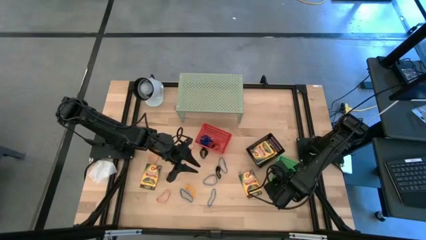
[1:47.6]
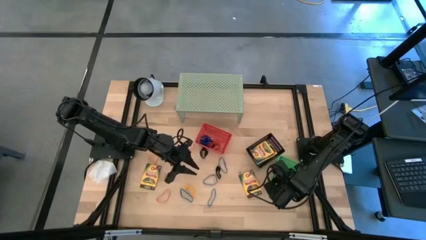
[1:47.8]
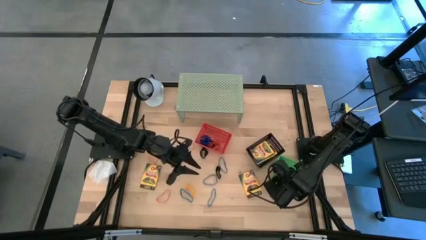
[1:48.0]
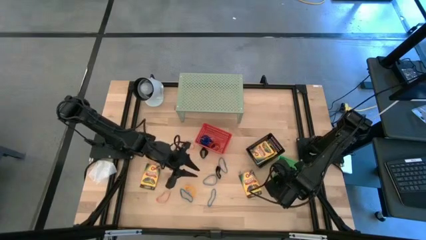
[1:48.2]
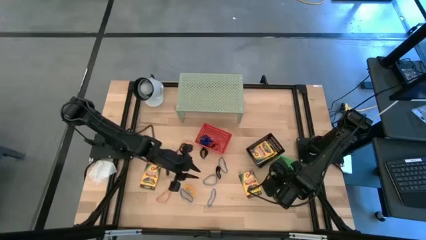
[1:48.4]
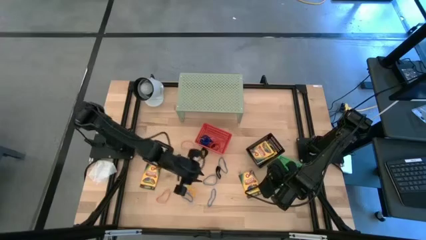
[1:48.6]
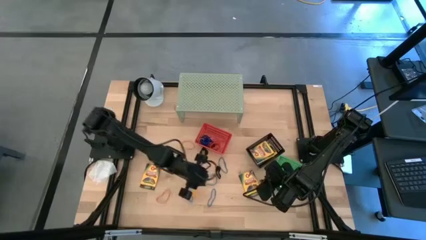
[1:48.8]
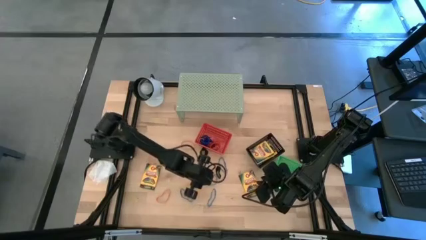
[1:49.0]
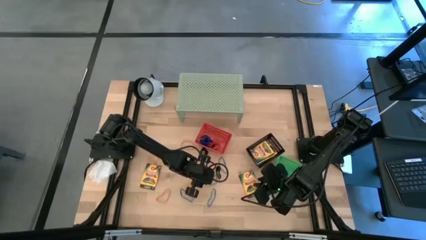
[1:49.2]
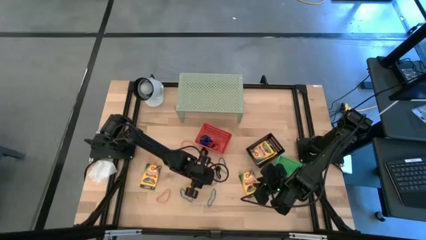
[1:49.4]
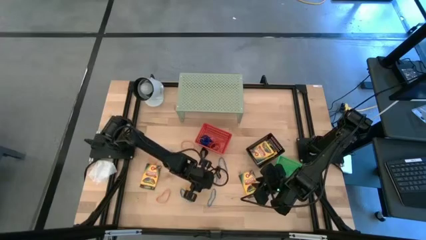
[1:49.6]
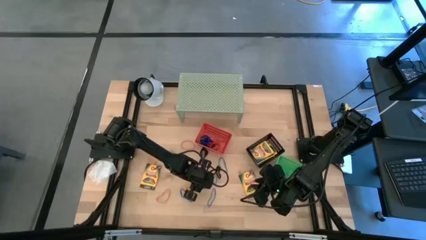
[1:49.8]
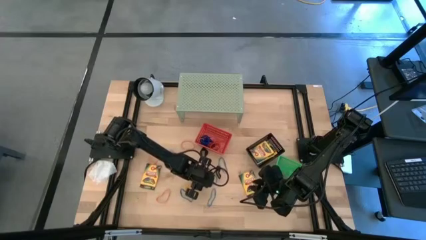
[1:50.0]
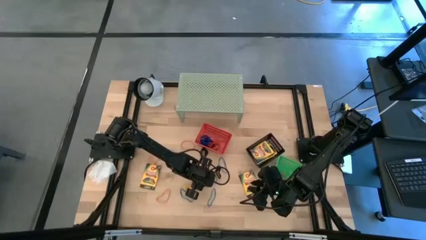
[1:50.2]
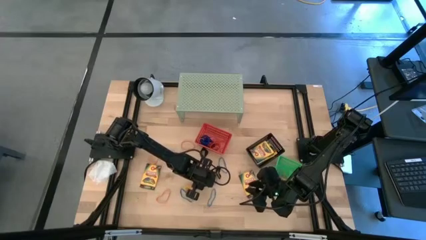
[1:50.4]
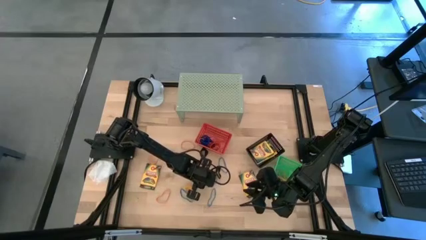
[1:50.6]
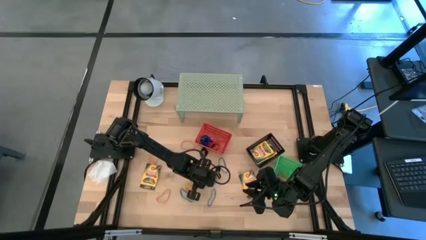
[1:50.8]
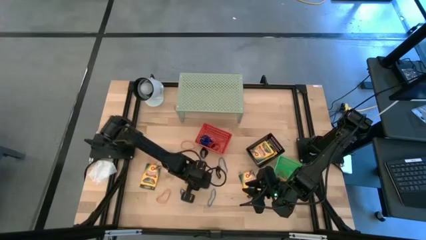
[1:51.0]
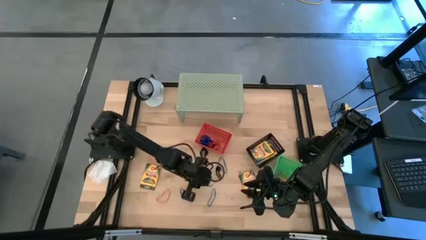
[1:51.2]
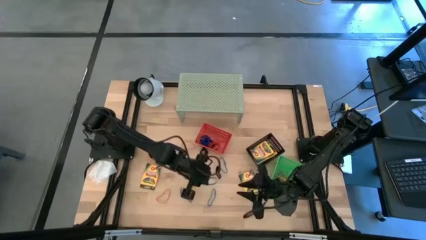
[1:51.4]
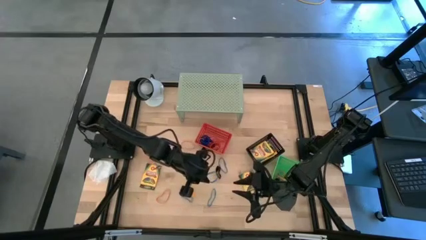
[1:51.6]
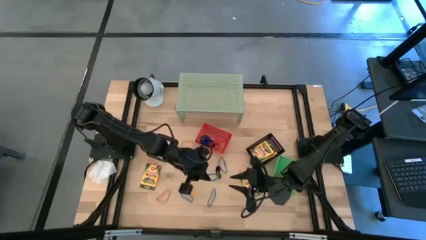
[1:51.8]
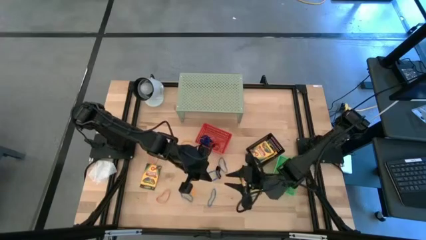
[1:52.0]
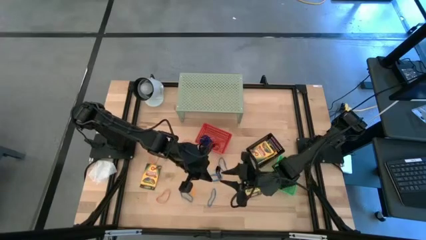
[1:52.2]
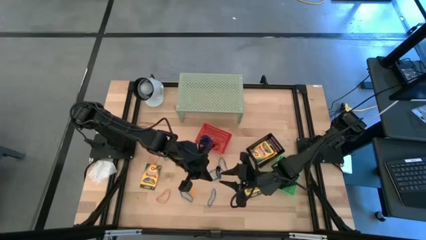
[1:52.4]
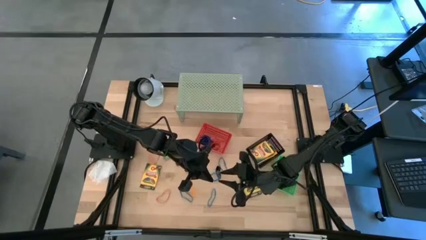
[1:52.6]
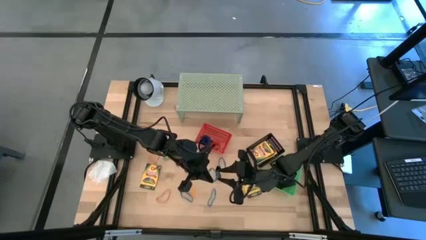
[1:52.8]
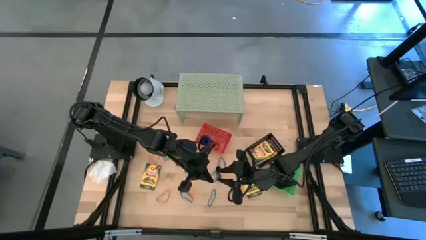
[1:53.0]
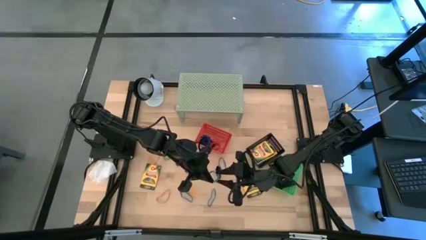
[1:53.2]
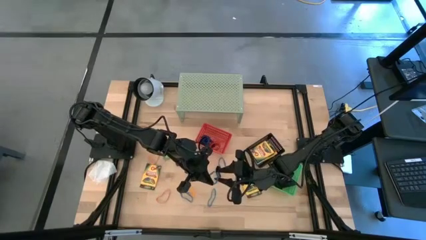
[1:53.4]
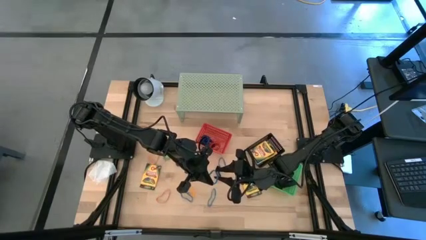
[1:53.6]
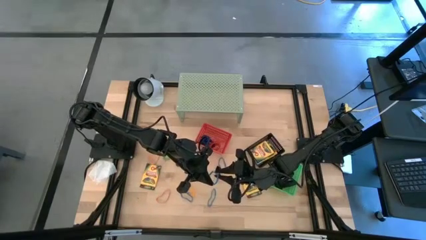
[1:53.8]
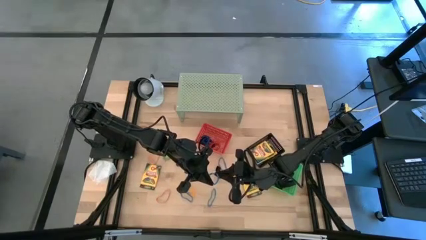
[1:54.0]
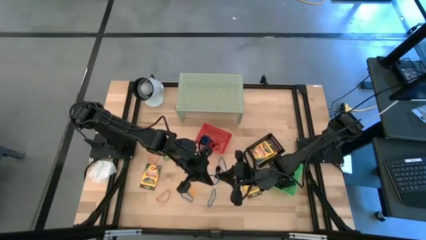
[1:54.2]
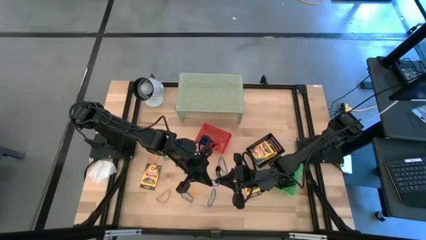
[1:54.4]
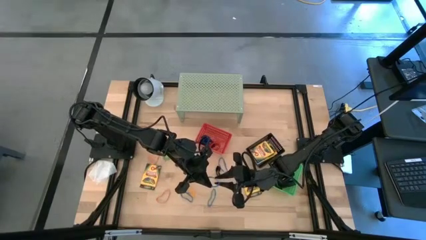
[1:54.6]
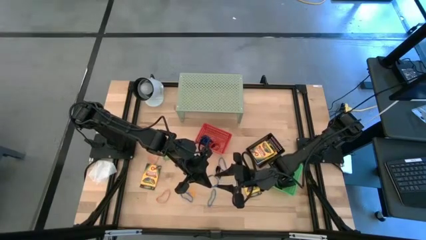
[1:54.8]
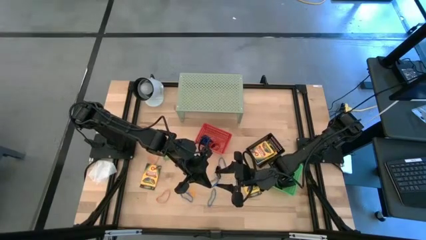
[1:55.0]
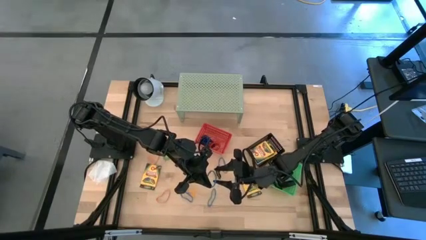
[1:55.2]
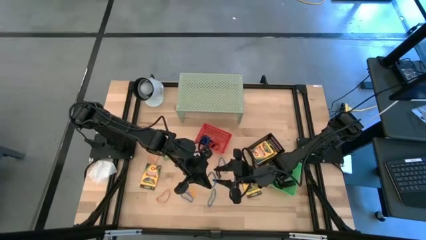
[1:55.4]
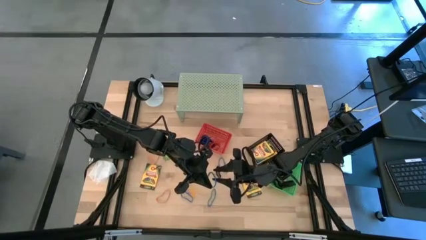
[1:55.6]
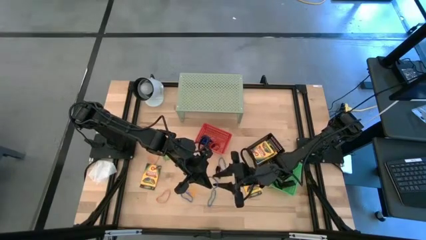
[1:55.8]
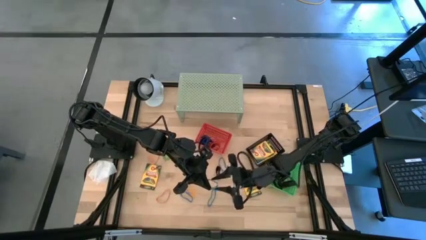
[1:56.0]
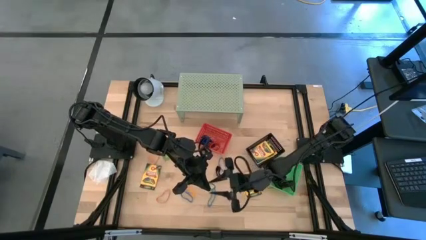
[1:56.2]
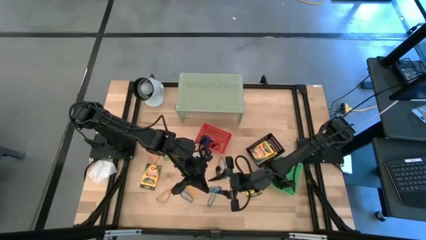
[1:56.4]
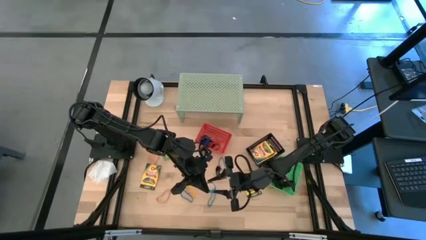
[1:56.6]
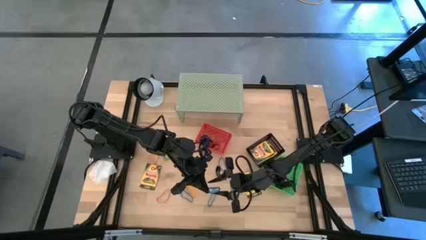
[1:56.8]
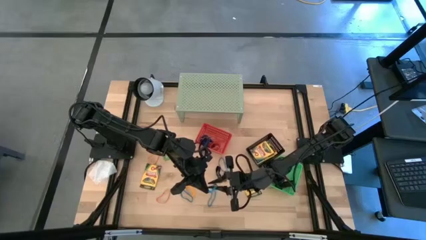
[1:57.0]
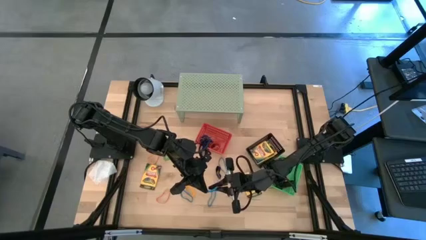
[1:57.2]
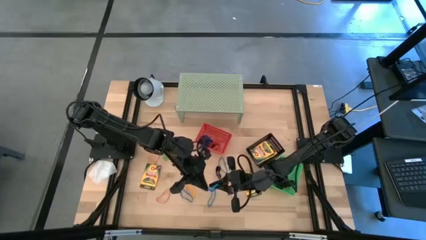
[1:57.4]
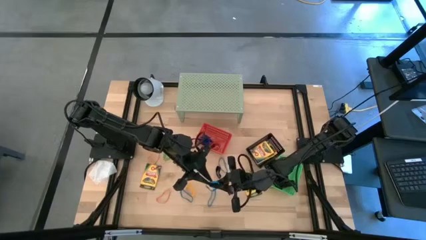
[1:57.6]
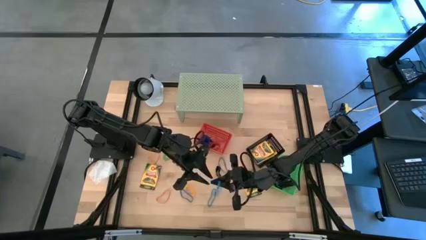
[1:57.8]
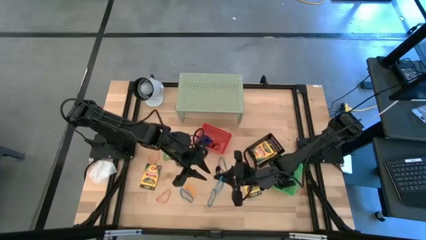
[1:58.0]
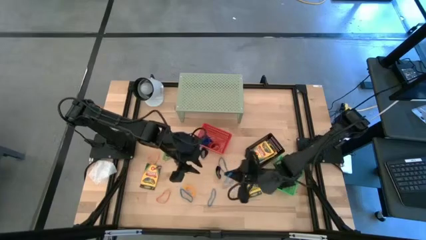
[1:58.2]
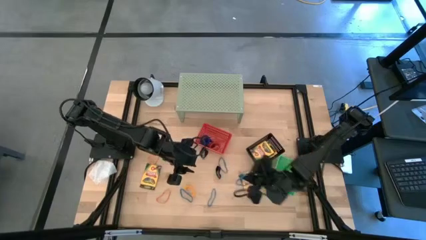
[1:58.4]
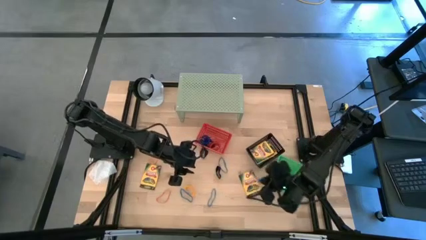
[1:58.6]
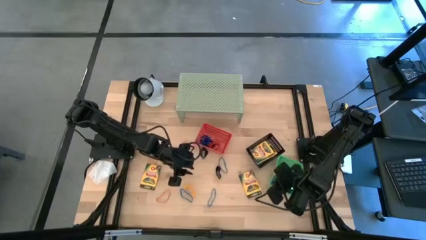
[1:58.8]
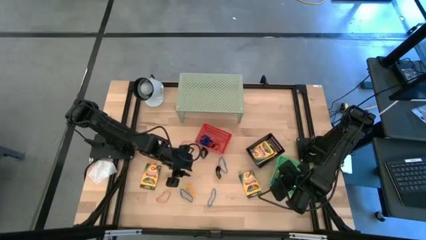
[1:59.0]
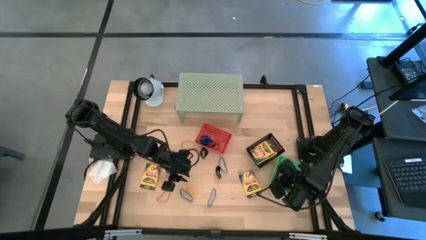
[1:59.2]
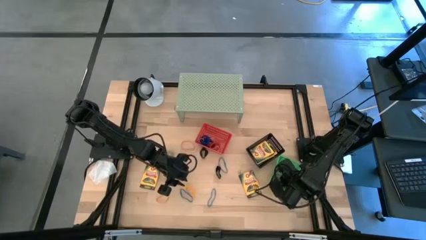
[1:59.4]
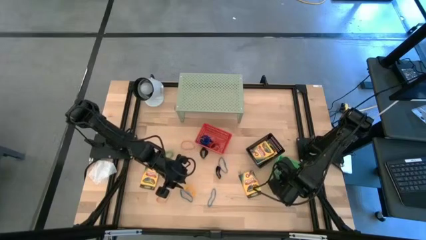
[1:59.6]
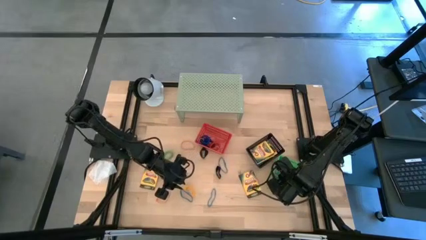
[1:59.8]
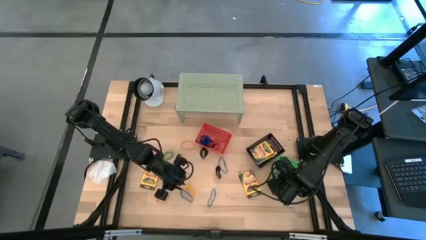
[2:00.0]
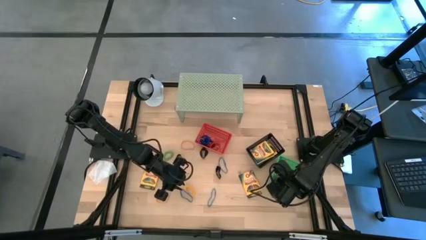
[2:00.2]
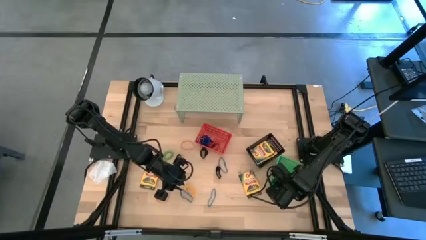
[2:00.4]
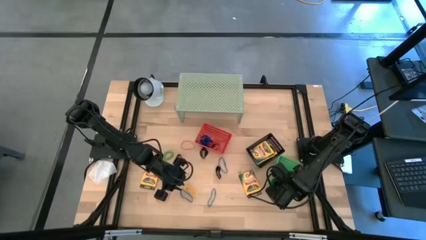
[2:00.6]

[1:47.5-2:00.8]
Task: Pick & Place Office Desk Supplies
Put the blue rubber band into the green bin

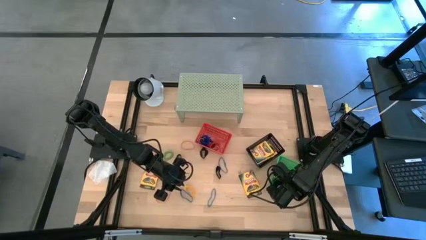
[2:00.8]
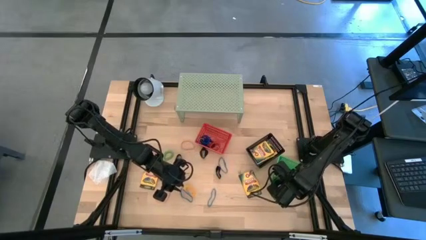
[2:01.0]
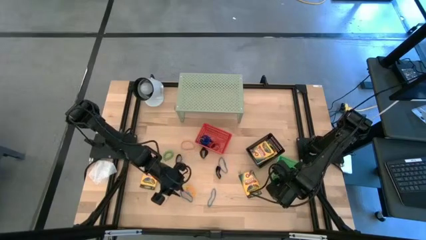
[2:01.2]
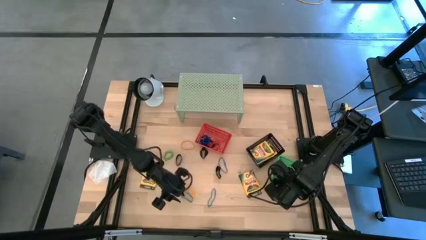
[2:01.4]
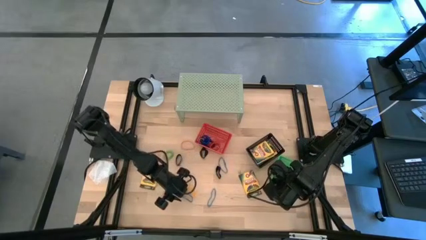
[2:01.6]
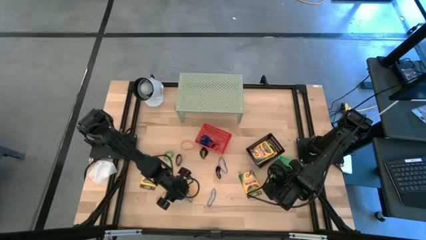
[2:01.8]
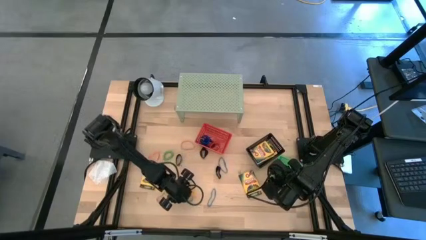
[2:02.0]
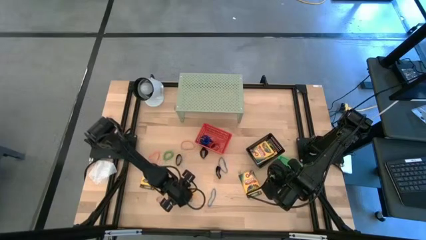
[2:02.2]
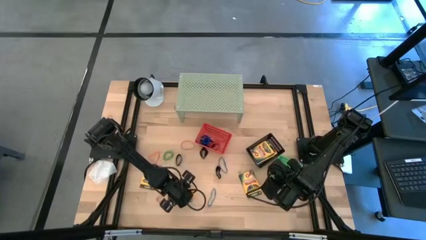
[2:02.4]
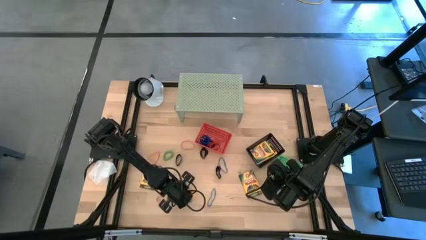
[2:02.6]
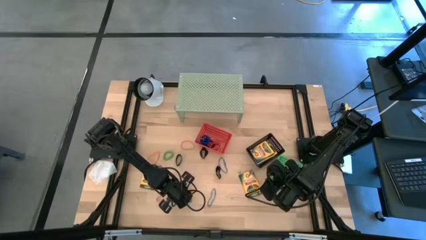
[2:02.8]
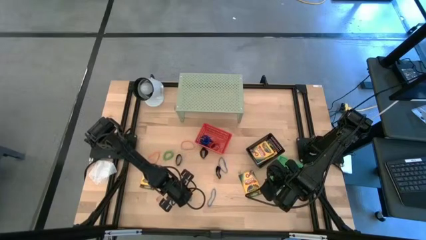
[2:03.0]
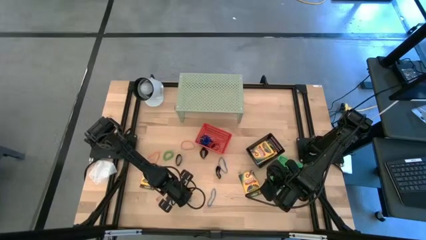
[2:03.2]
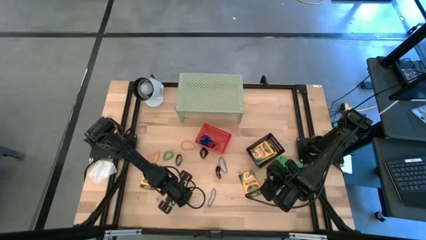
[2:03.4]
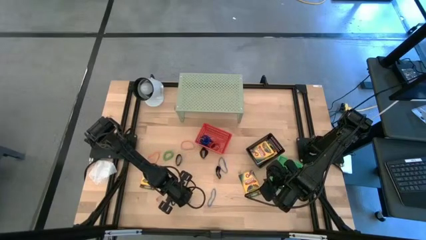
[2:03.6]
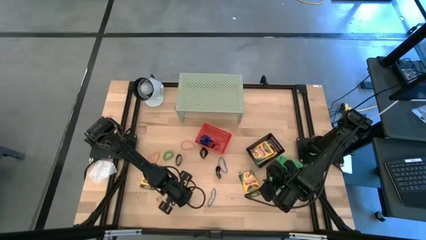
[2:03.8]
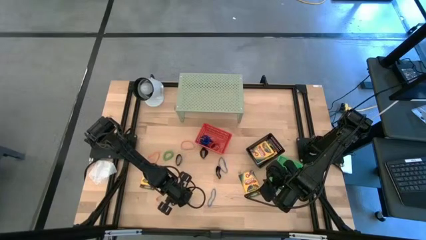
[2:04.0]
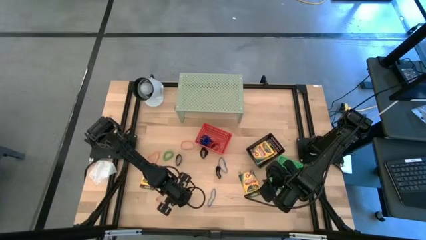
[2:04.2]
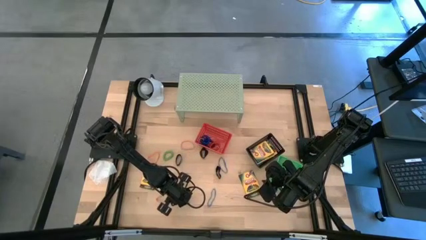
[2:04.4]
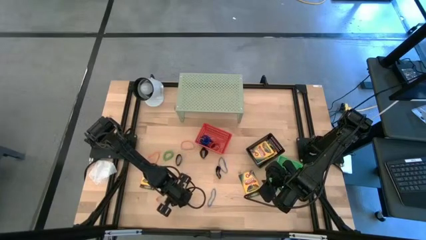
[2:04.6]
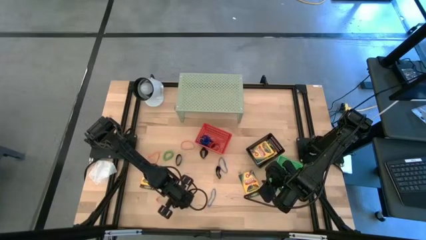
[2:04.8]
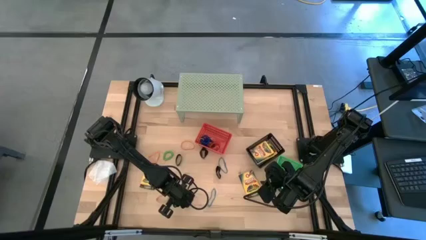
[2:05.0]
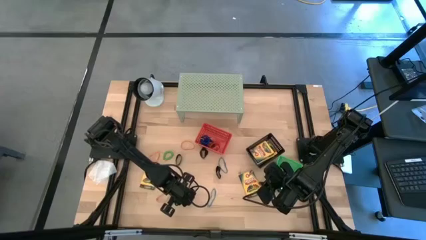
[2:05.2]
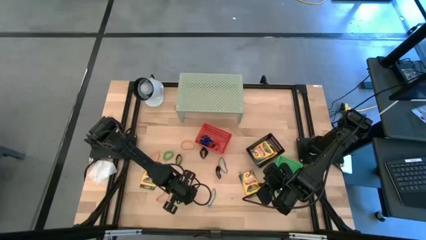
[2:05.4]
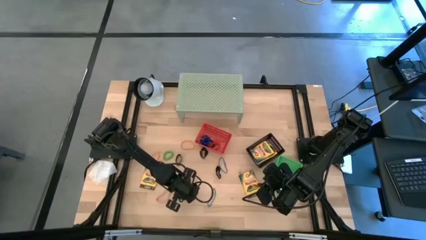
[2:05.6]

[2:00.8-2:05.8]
Put the blue rubber band into the green bin
